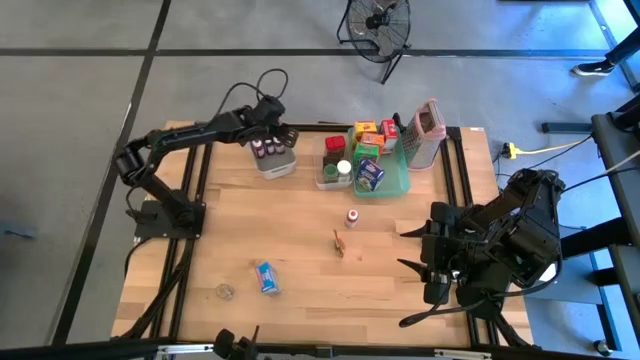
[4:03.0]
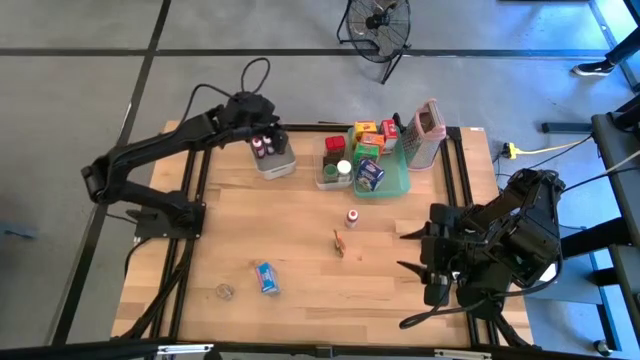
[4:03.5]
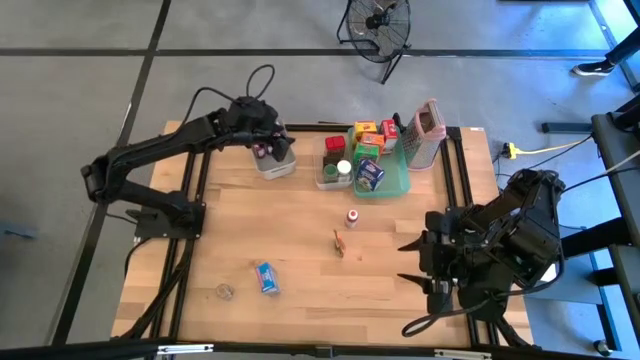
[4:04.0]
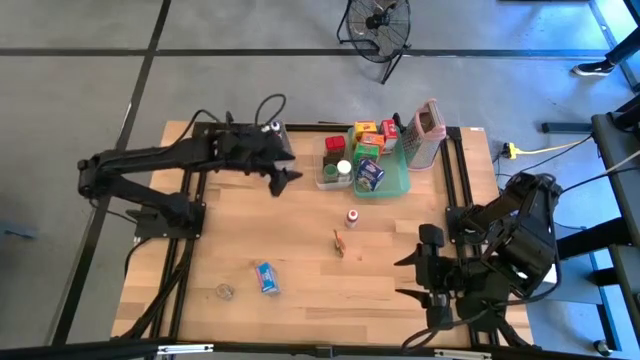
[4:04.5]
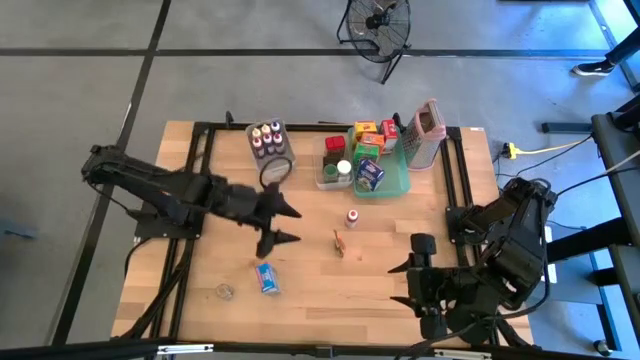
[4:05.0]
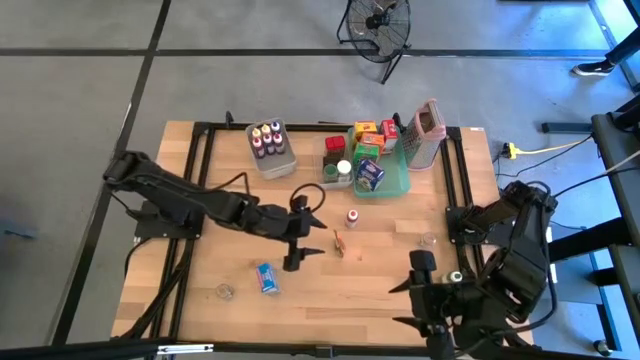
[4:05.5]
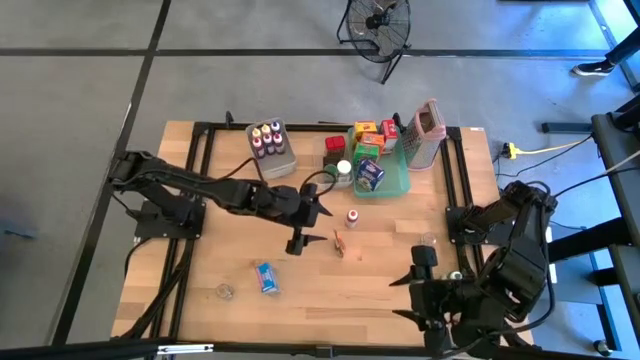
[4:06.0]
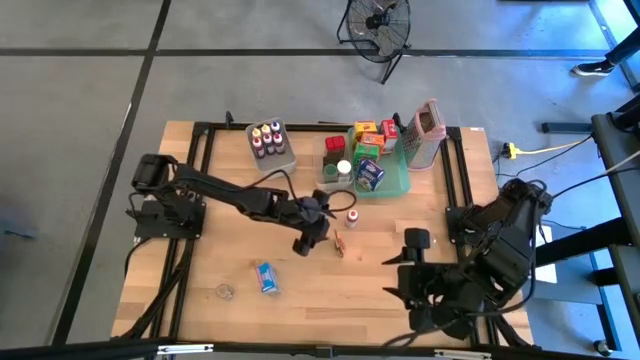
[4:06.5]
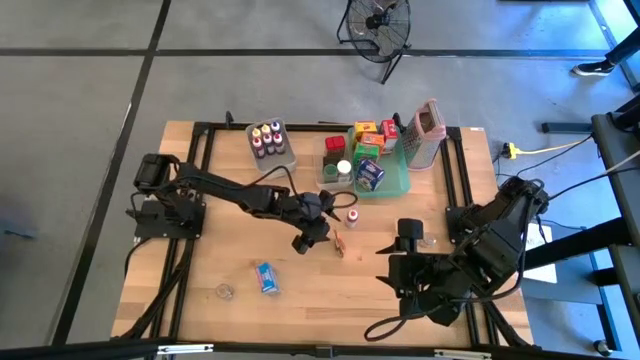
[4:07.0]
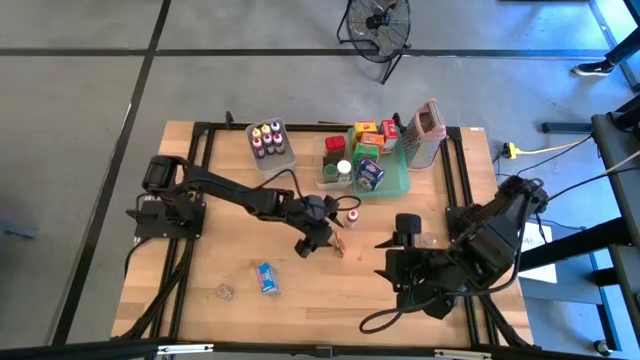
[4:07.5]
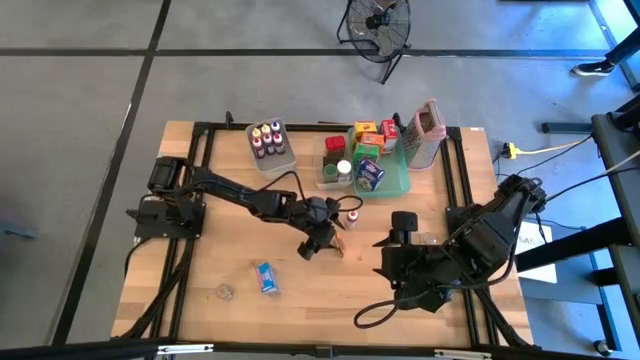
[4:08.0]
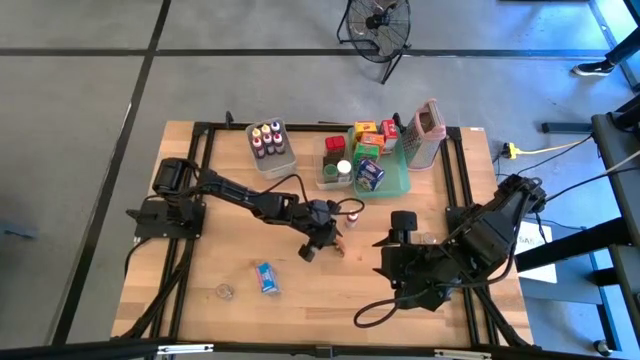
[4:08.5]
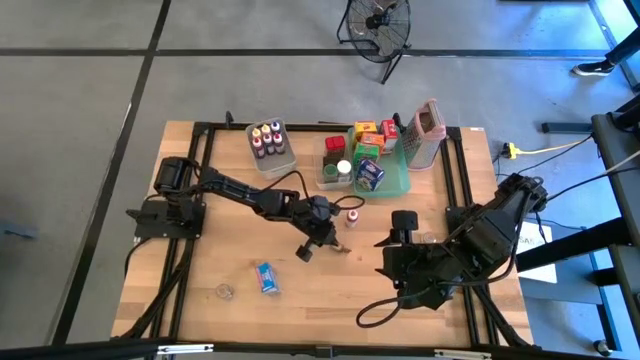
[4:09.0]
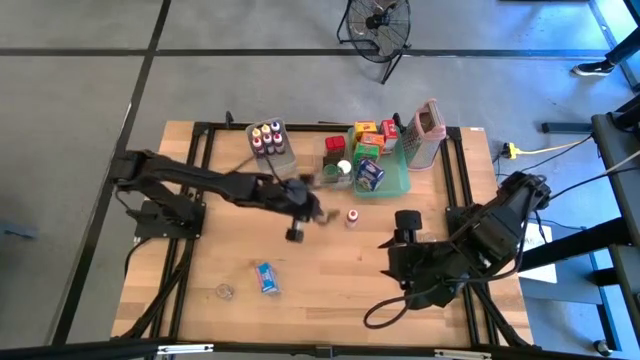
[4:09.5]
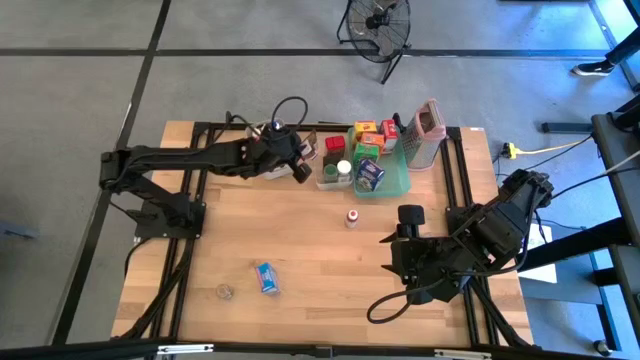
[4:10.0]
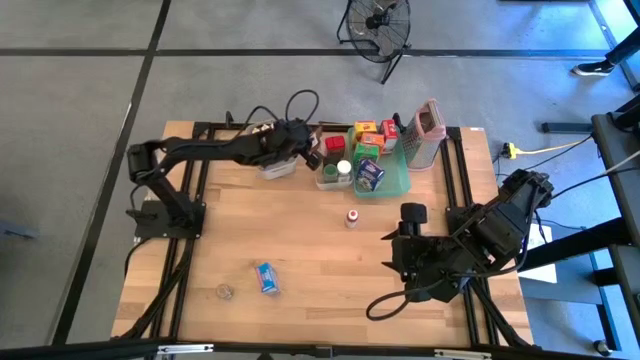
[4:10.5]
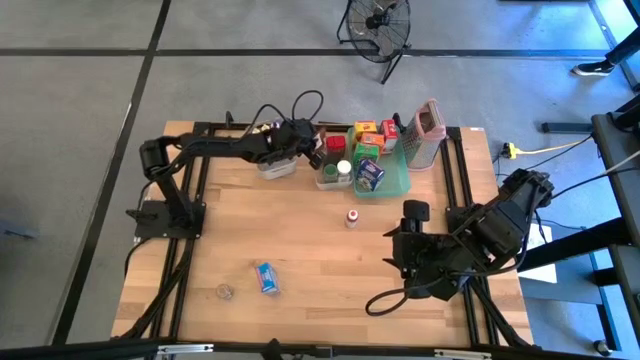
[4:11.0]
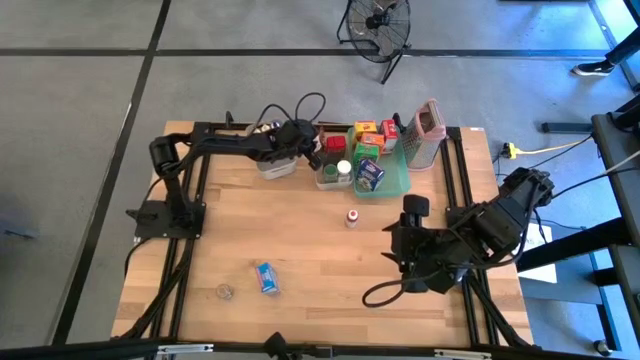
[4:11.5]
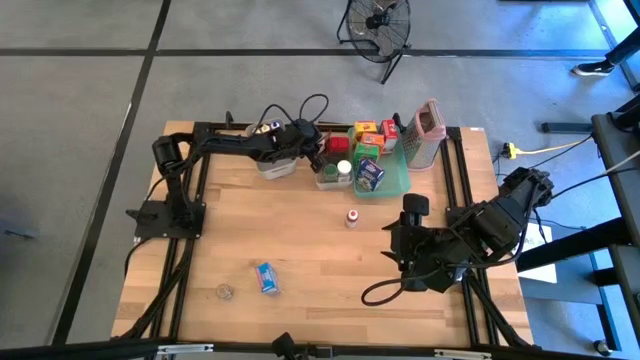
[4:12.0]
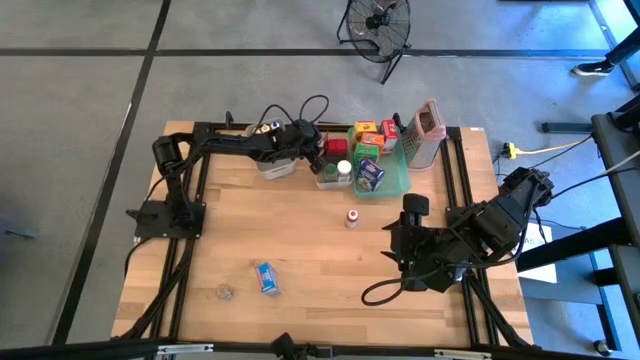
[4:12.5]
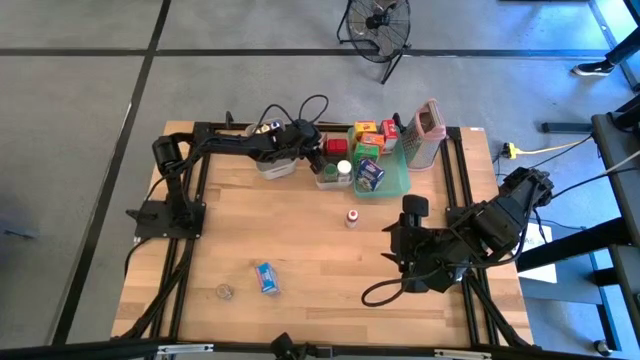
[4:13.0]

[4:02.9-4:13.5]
Task: Pick & Place Kitchen Items
Put the orange seasoning pack into the white bin

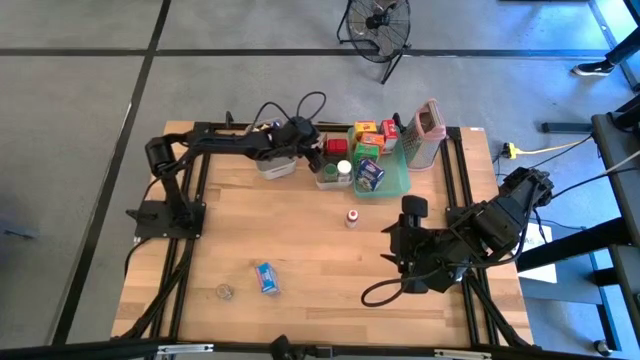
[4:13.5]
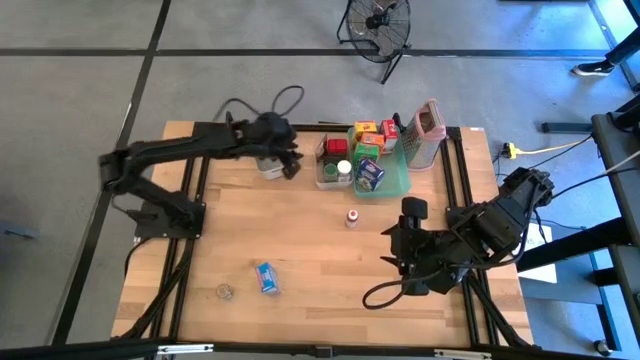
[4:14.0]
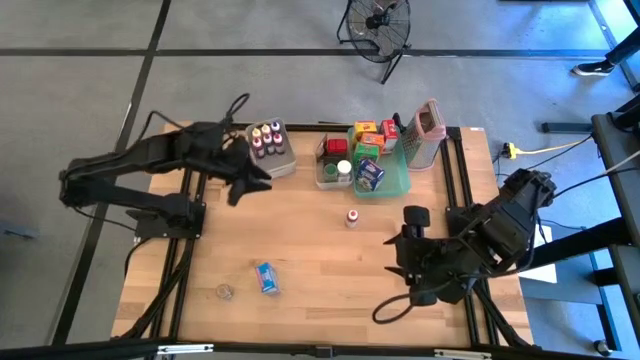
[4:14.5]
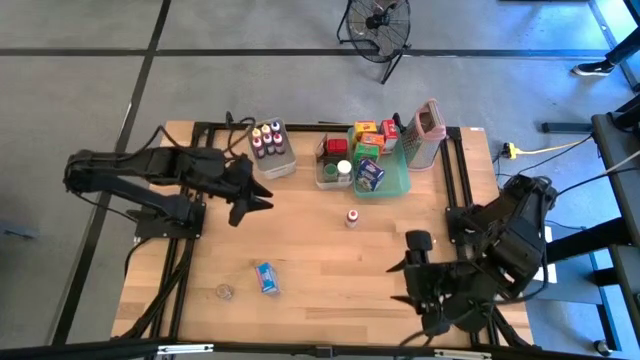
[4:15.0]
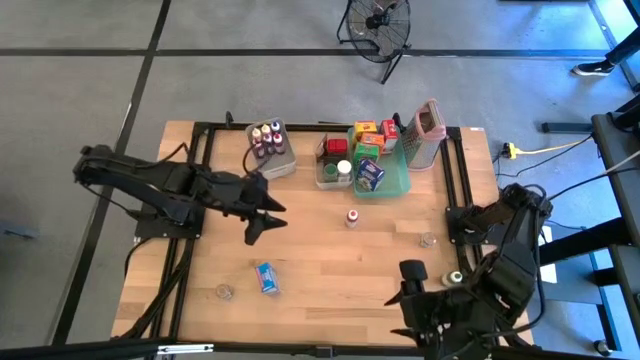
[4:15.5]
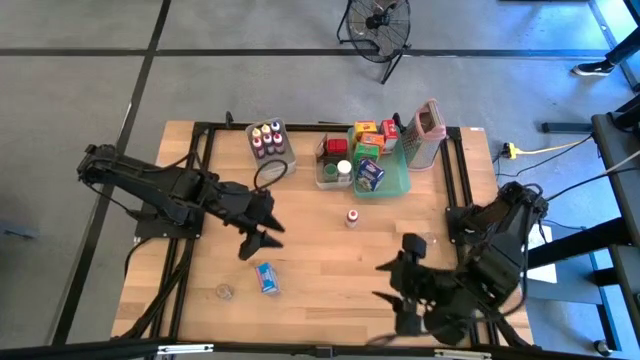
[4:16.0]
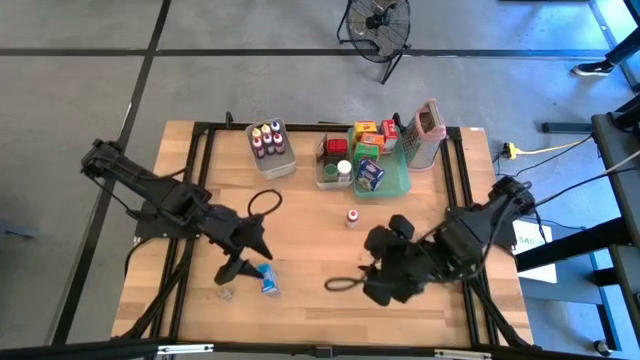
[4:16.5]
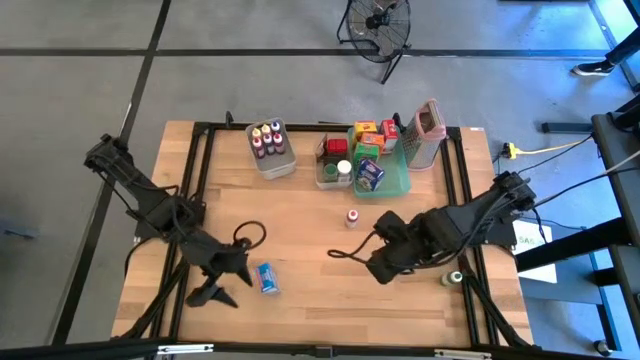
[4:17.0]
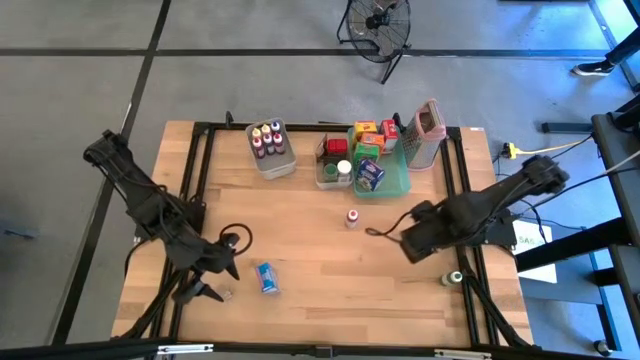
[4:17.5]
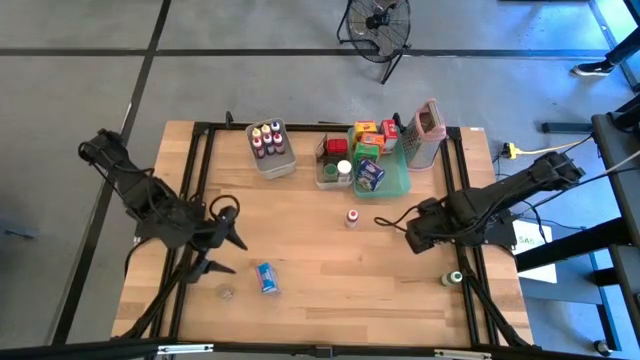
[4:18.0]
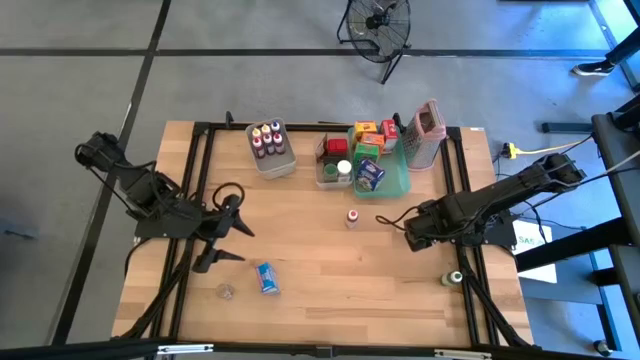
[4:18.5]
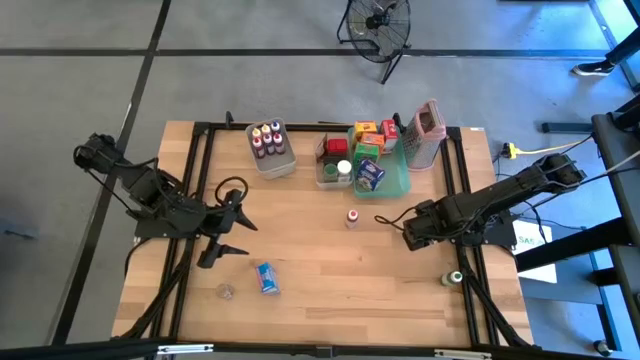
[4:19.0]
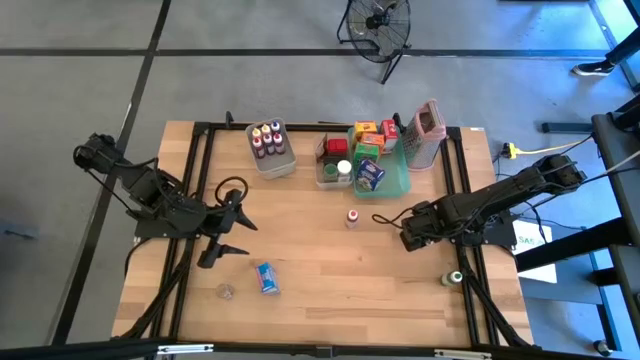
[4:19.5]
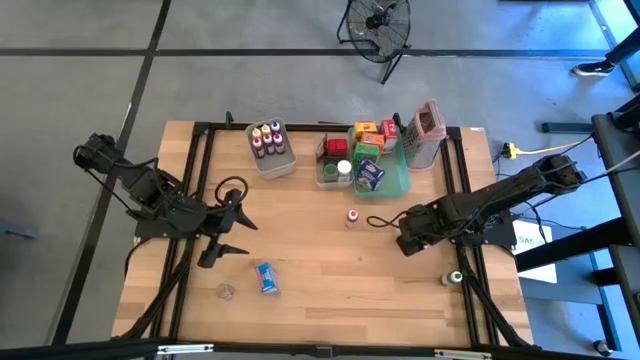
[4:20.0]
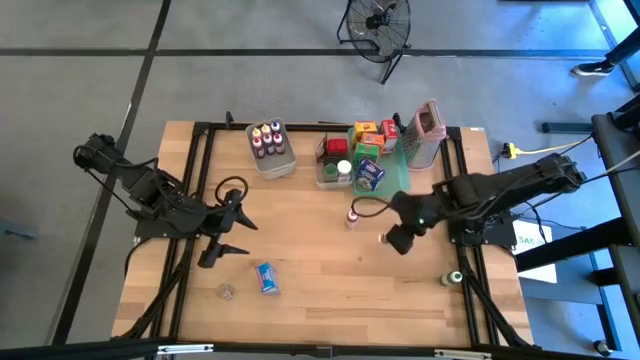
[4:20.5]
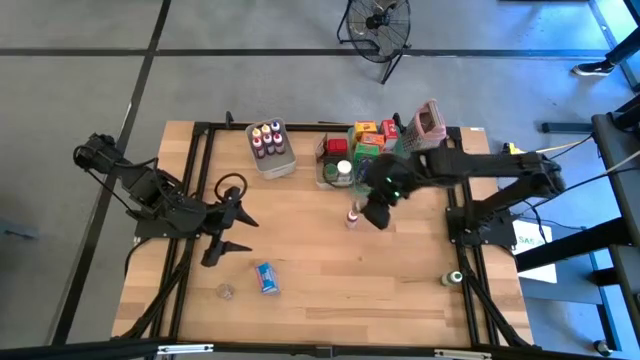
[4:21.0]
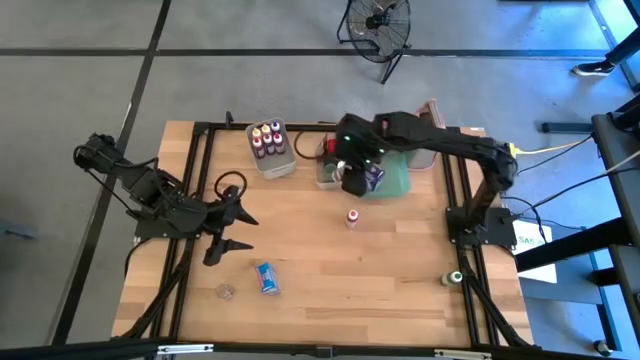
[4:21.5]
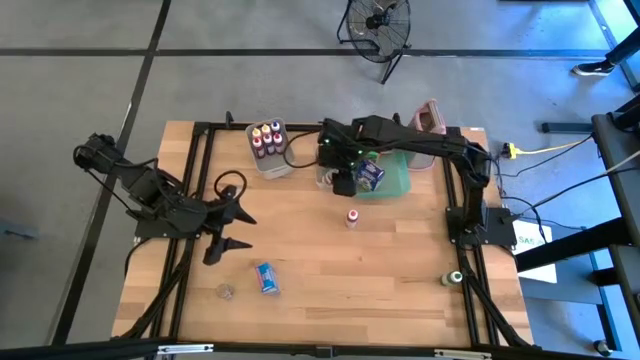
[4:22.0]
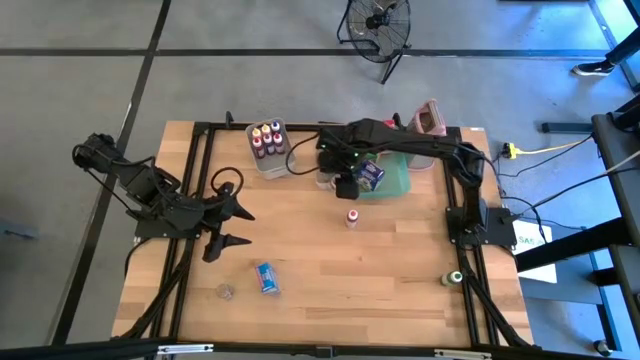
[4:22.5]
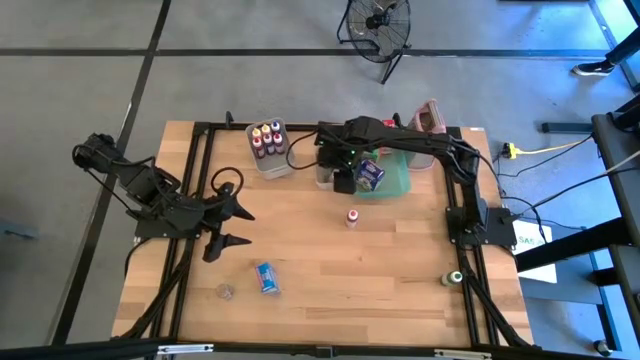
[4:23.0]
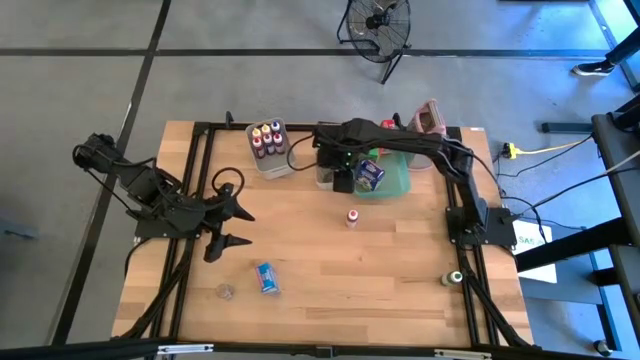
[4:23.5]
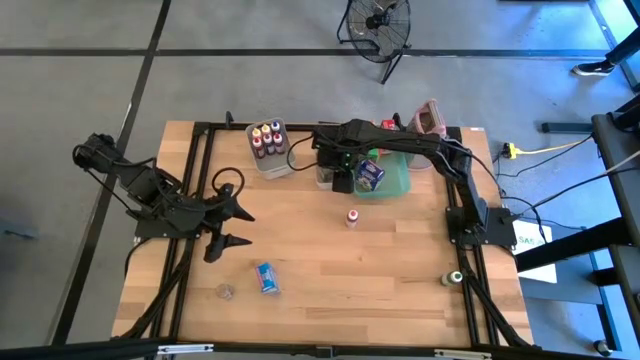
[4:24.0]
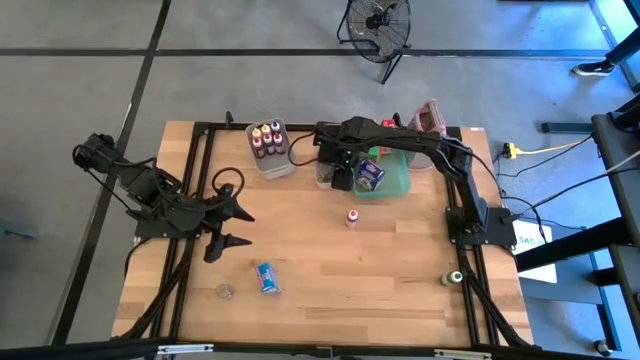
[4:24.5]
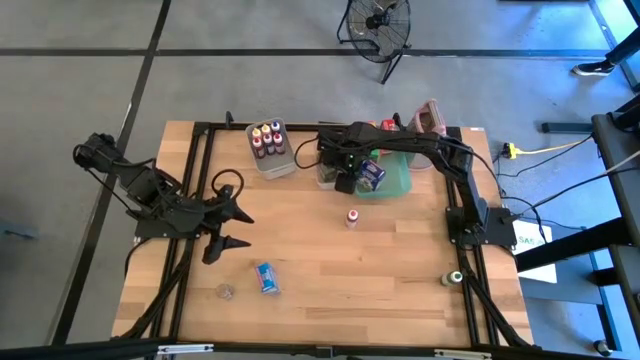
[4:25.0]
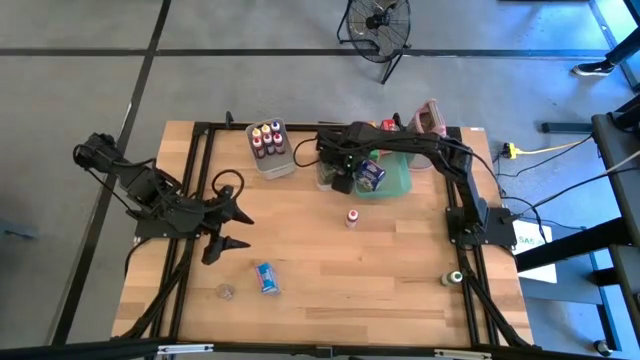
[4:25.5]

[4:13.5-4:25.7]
Put the brown seasoning bottle into the white bin
